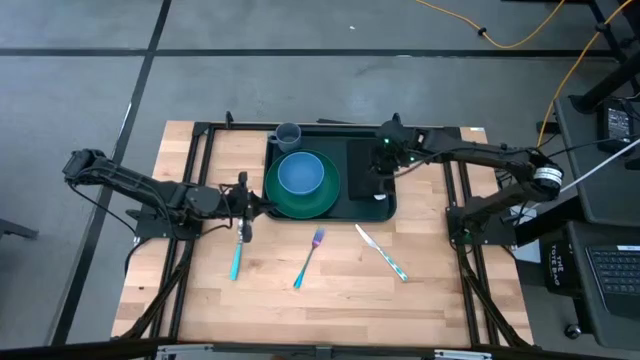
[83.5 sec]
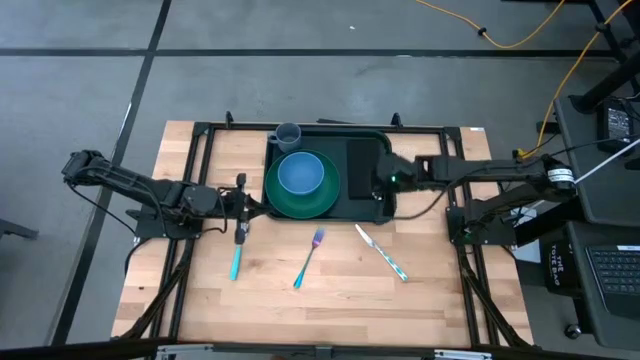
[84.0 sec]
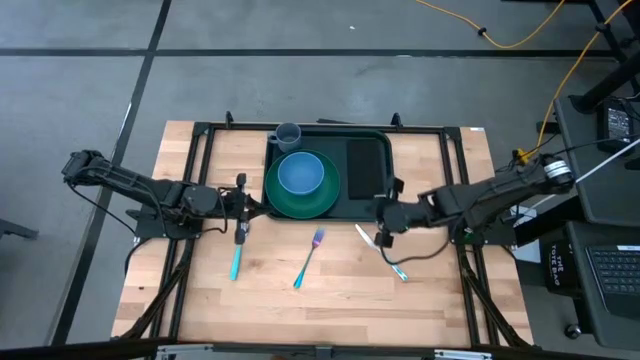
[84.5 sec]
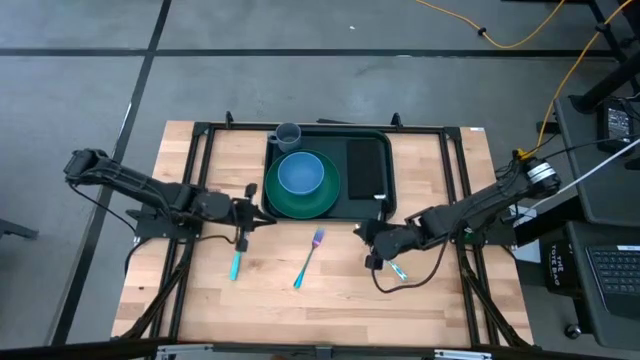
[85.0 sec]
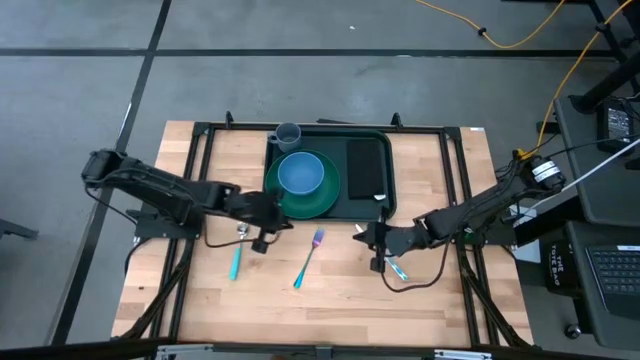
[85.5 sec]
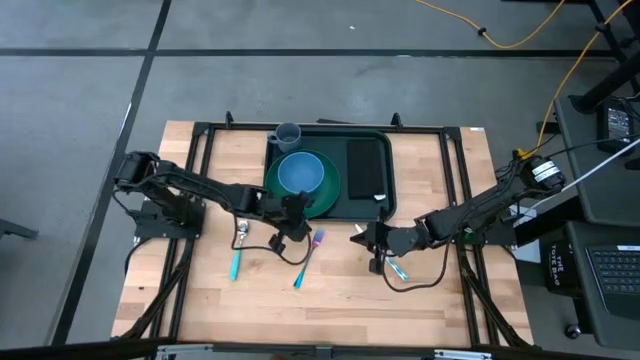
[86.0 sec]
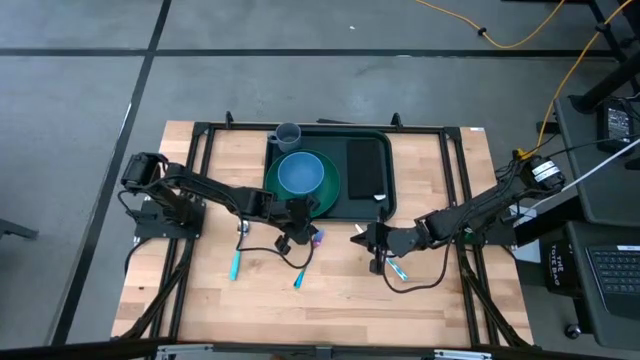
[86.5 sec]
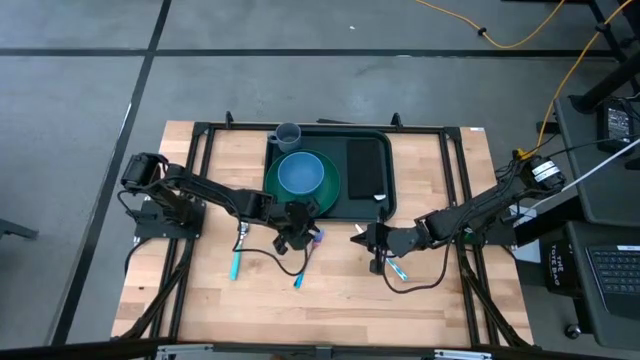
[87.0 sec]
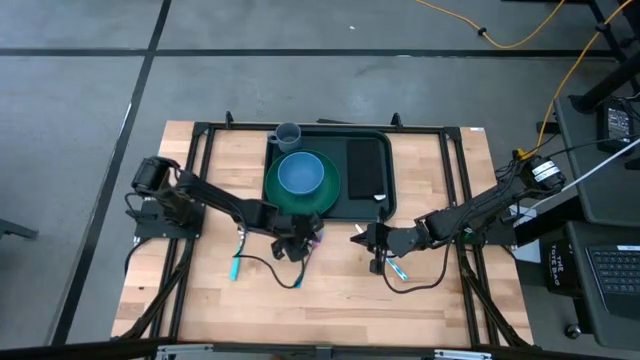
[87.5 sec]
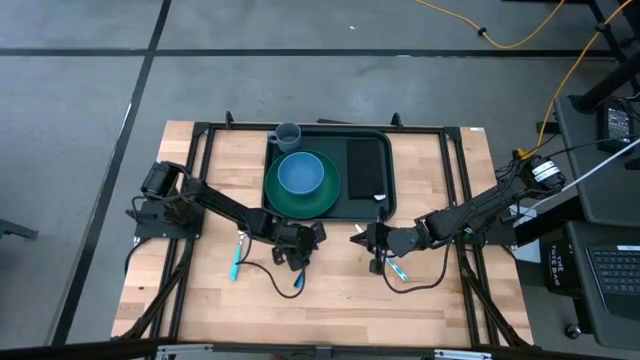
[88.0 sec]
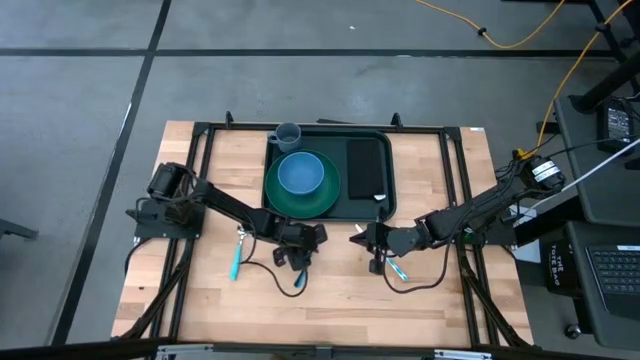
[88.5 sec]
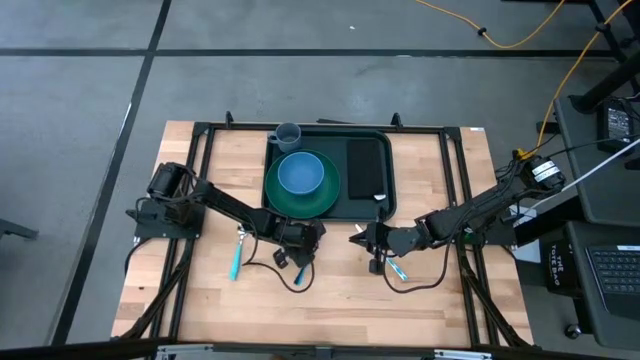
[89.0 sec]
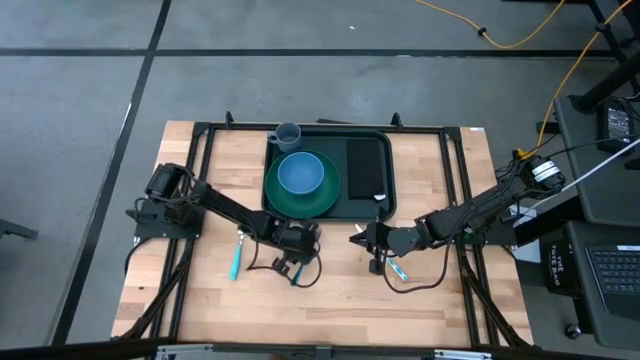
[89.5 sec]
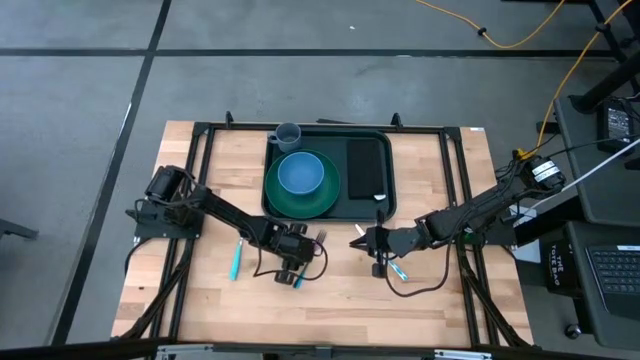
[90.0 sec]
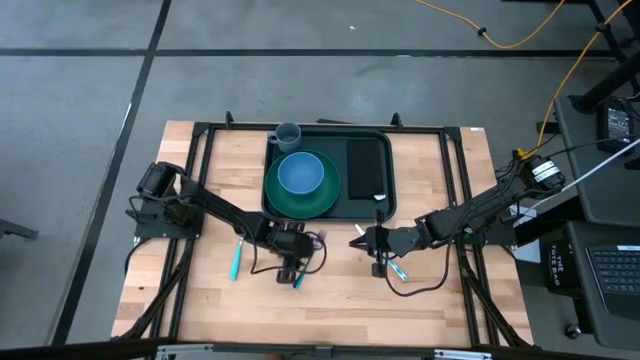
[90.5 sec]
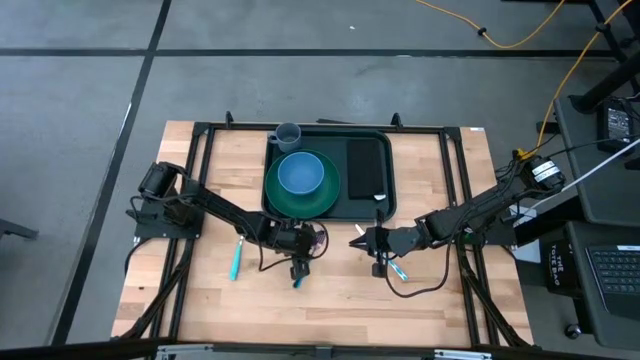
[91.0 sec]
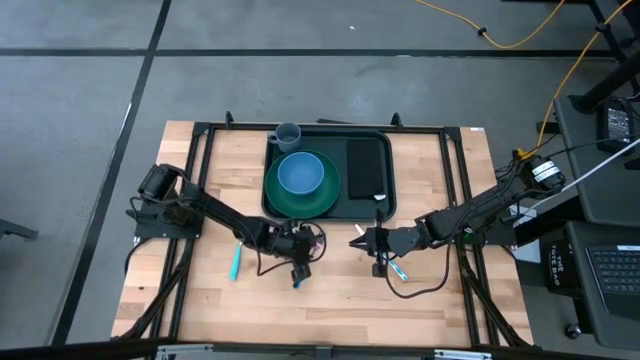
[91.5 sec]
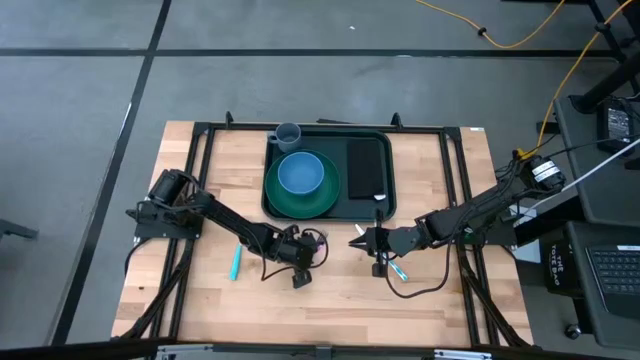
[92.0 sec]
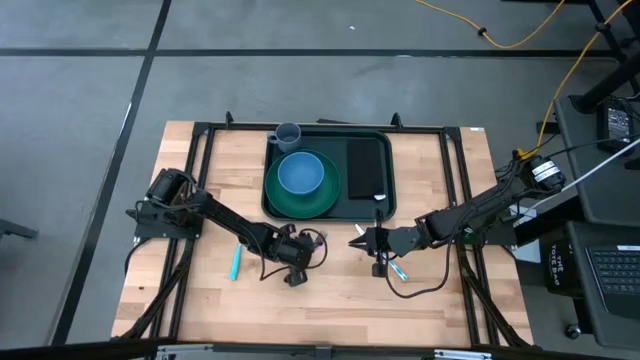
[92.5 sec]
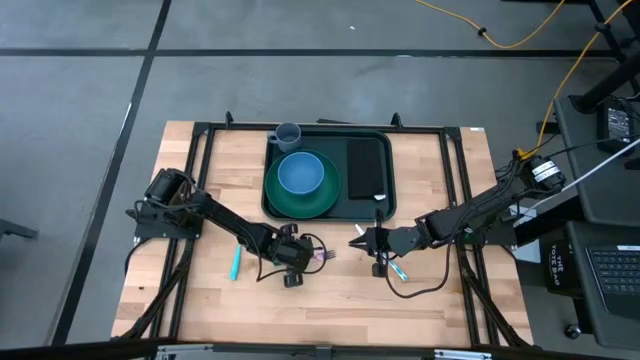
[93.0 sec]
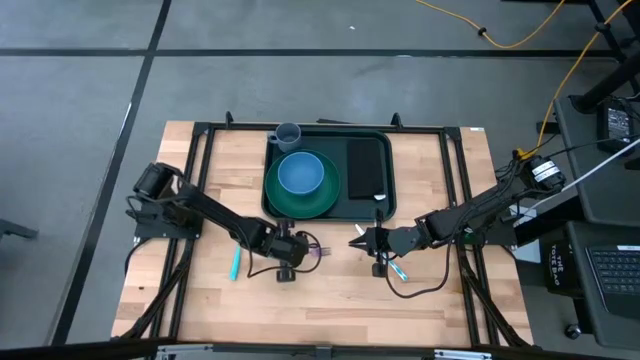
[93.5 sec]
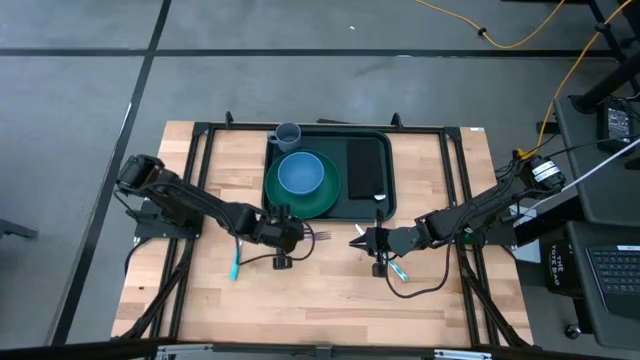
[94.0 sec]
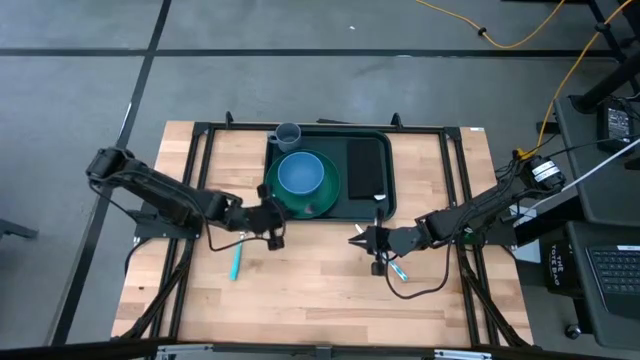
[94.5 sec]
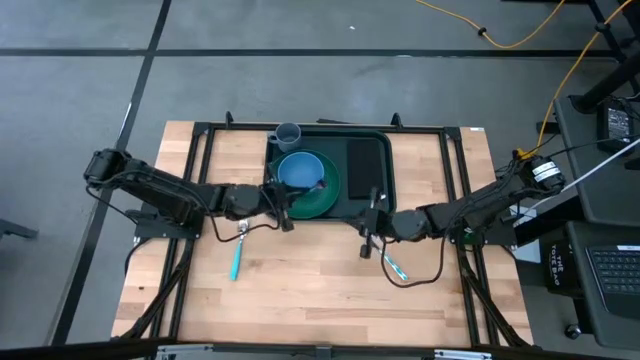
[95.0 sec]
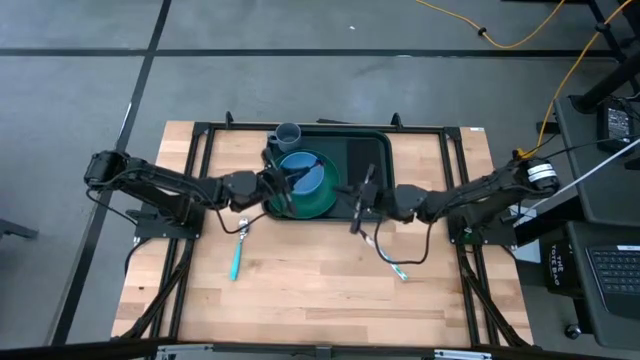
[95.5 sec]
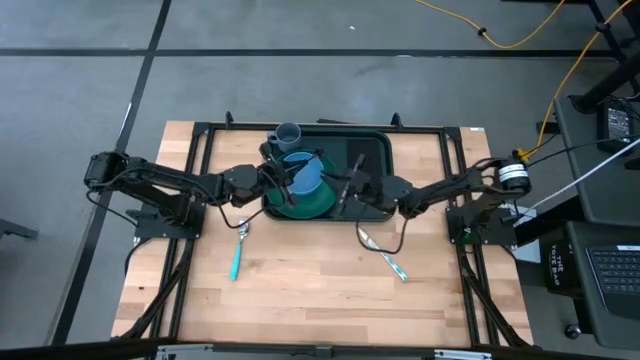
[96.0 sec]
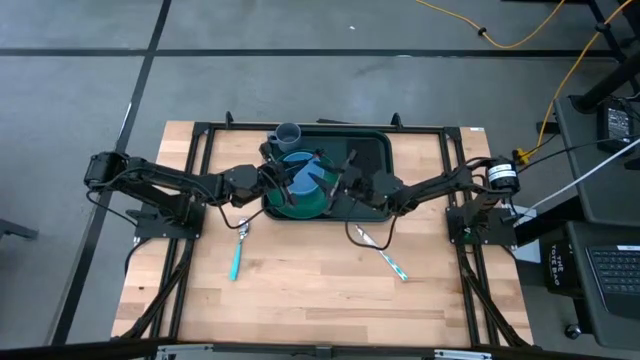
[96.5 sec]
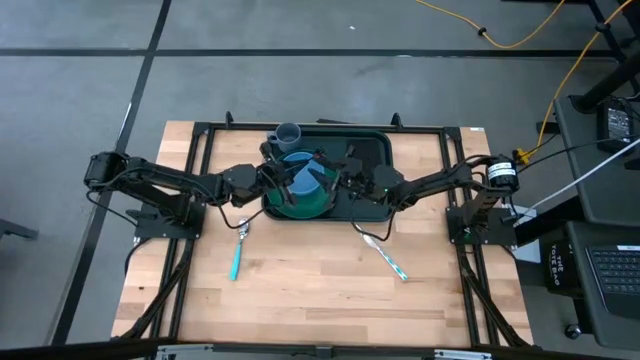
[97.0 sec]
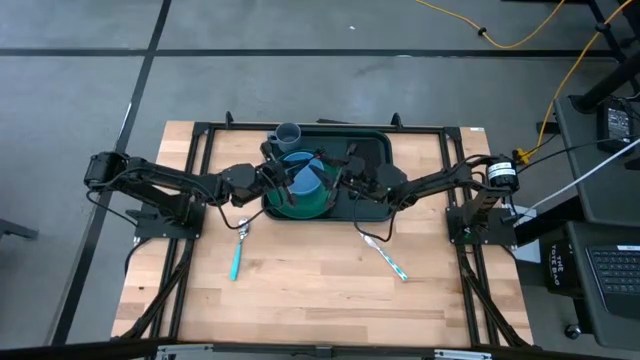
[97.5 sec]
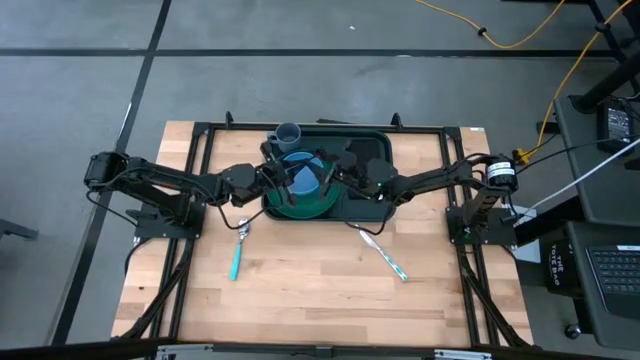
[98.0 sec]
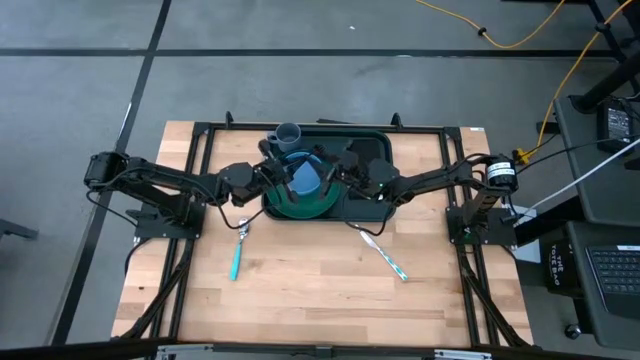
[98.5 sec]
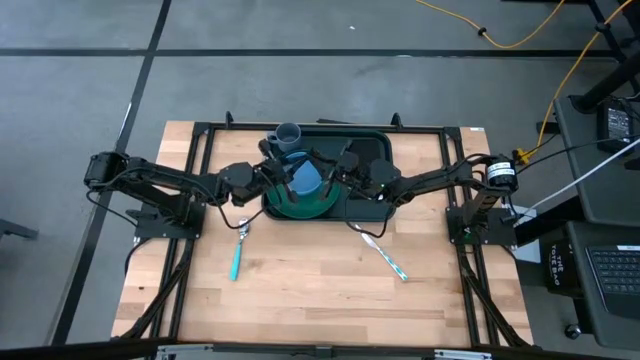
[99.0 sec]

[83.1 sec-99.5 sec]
Task: Set up tray
Put the blue fork on the black table napkin

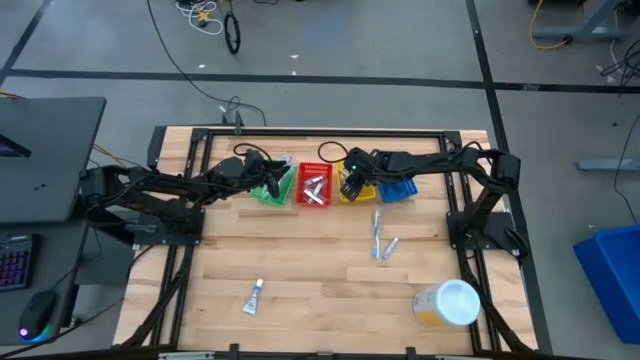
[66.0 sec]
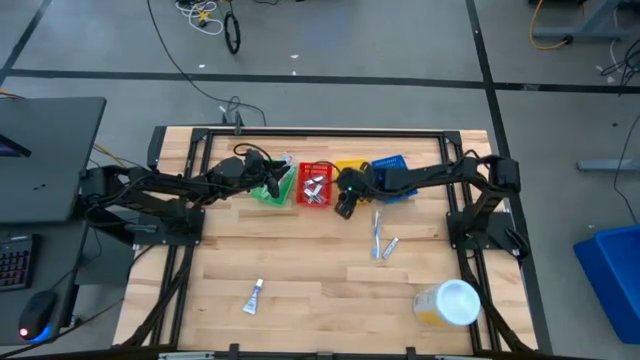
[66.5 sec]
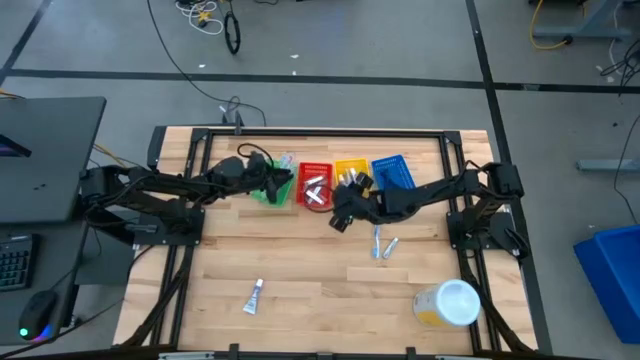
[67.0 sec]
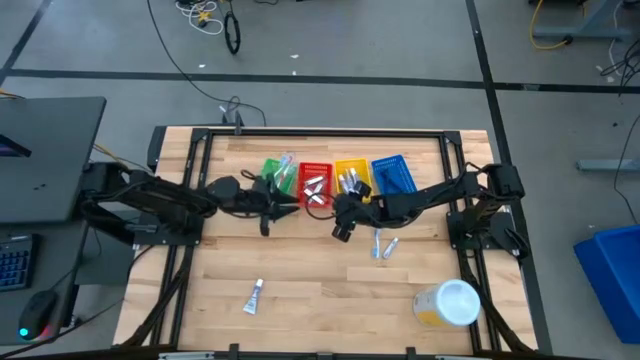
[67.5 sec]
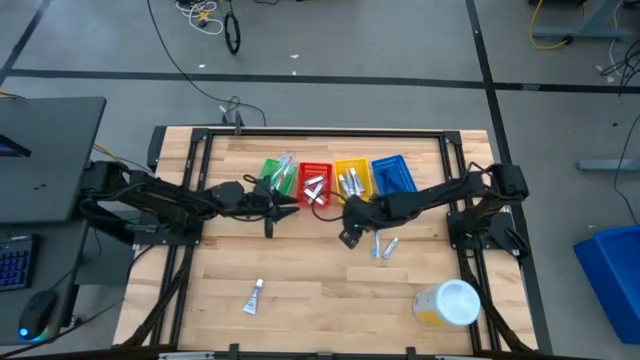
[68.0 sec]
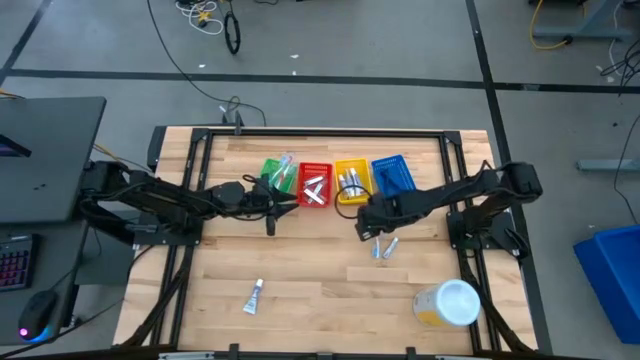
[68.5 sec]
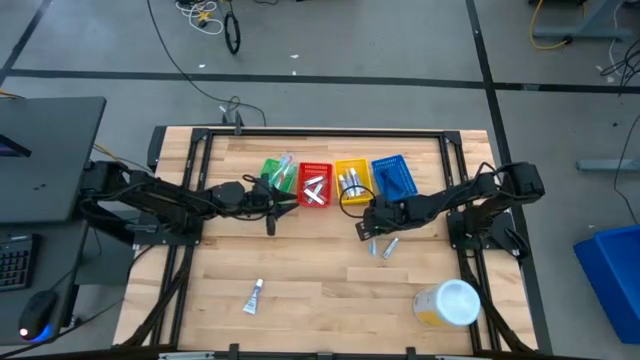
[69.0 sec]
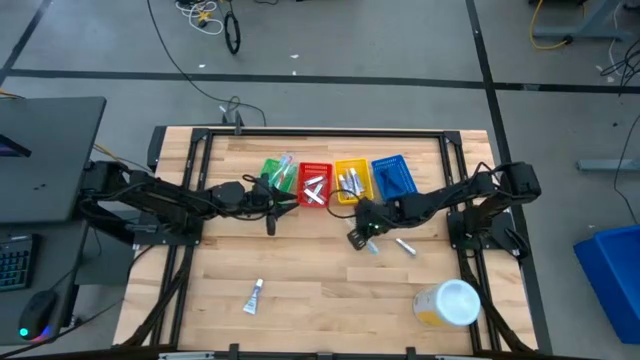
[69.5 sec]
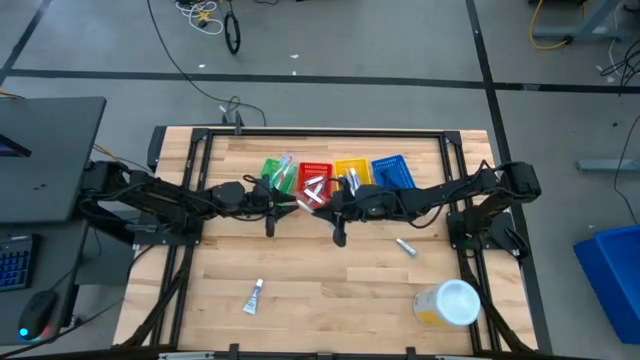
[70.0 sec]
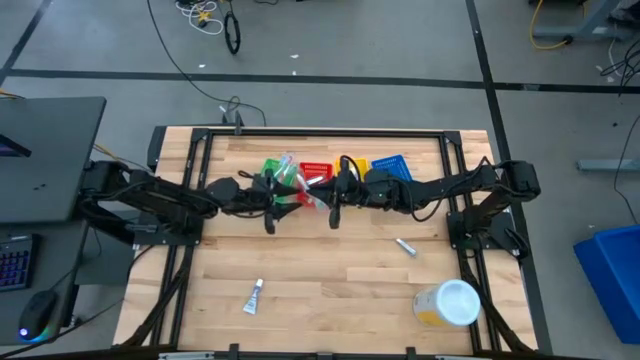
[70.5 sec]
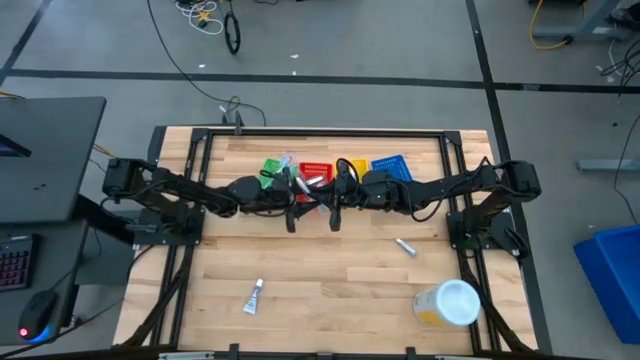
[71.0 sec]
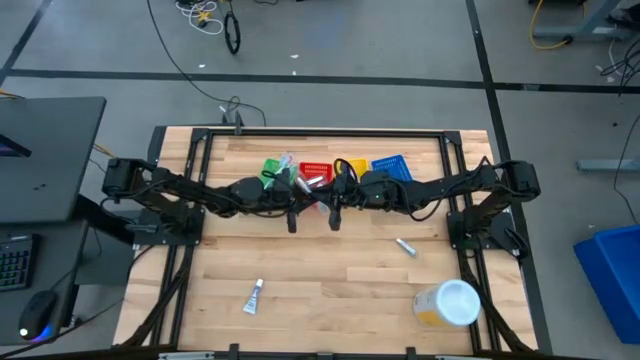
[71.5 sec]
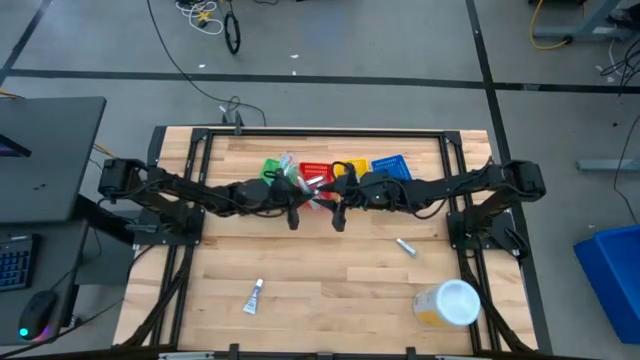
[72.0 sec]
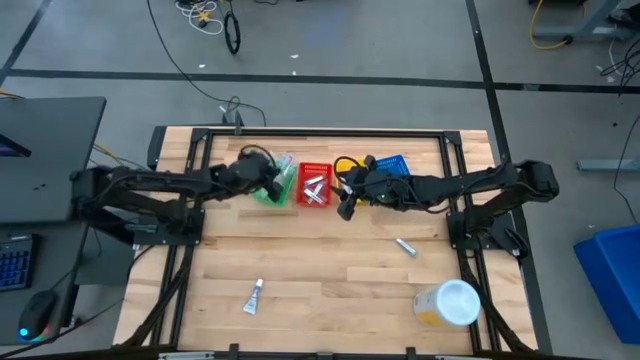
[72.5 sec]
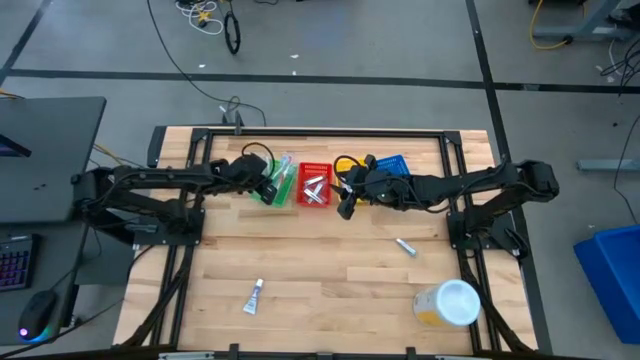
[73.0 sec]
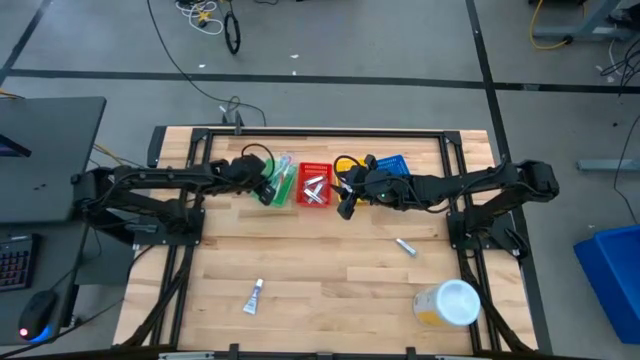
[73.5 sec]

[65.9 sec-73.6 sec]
Task: Pick & Place Travel size toiletries
Put the light blue toothbrush into the green bin
